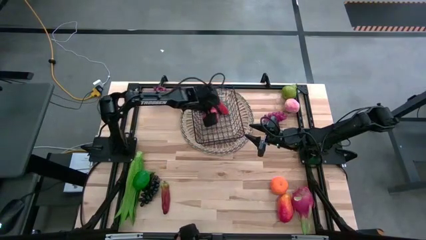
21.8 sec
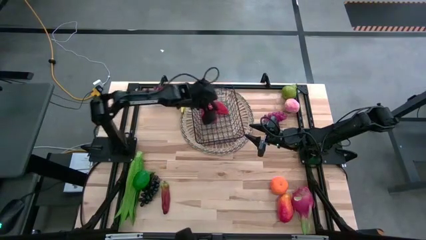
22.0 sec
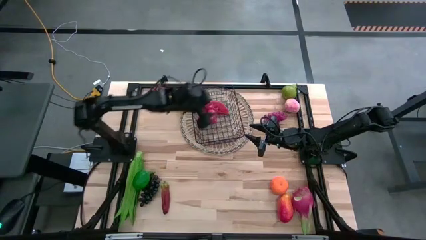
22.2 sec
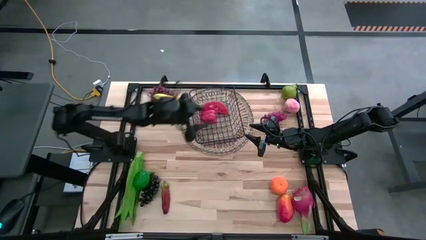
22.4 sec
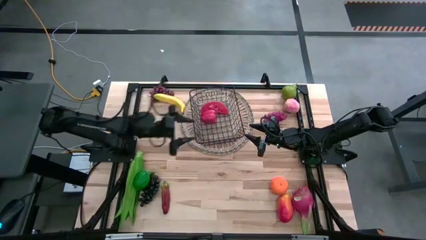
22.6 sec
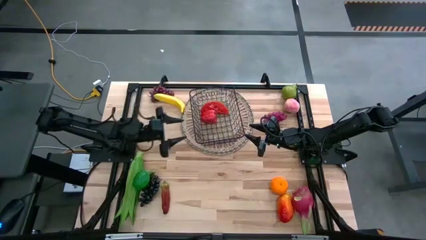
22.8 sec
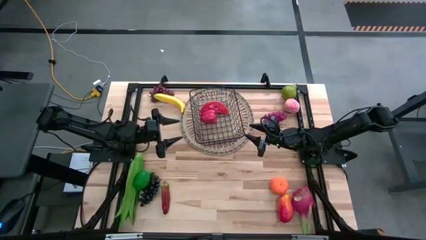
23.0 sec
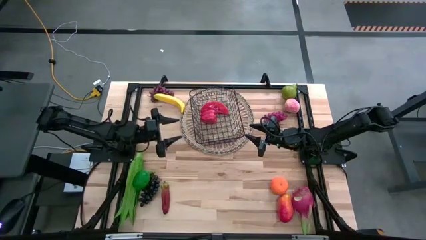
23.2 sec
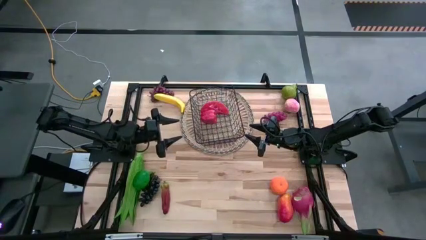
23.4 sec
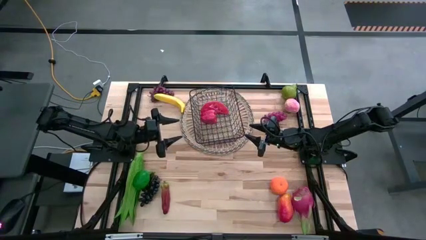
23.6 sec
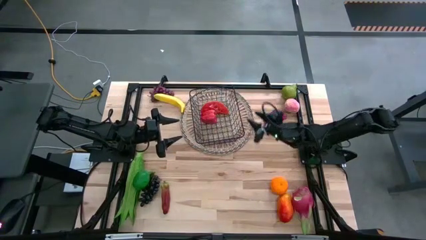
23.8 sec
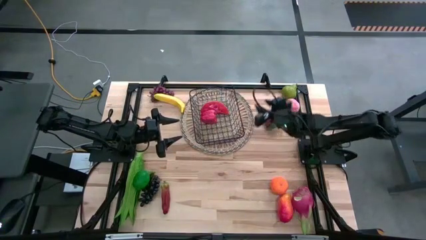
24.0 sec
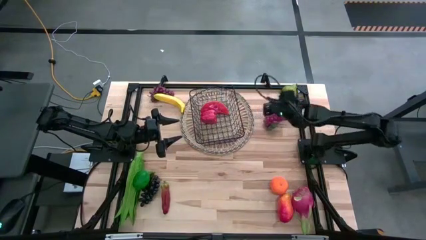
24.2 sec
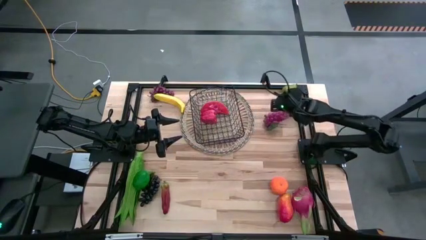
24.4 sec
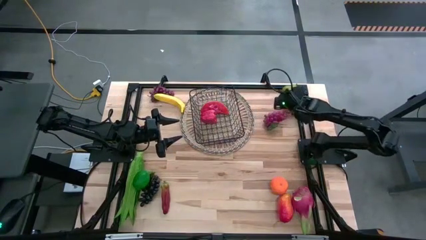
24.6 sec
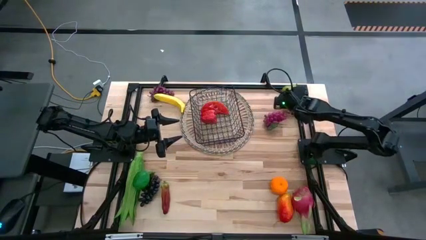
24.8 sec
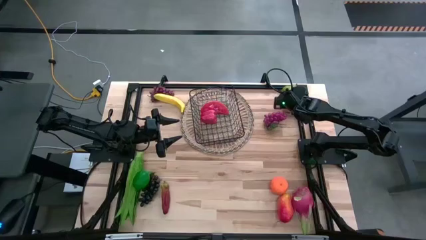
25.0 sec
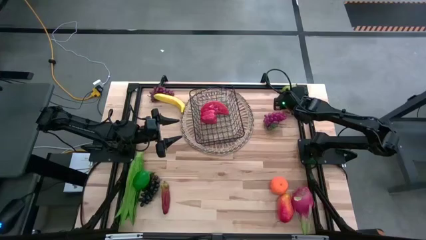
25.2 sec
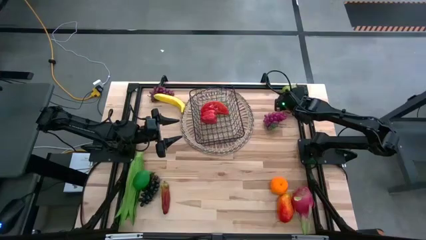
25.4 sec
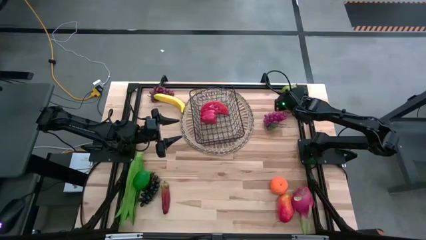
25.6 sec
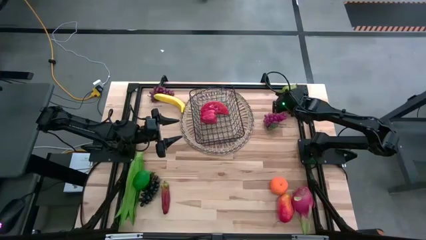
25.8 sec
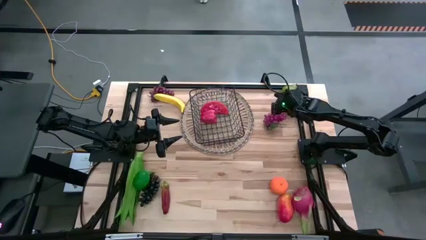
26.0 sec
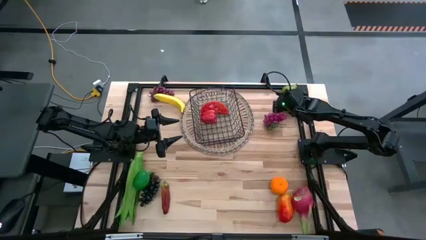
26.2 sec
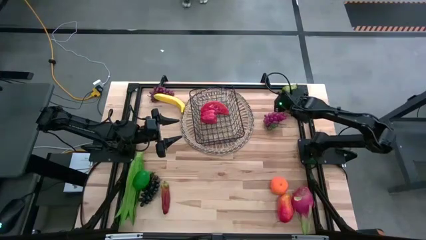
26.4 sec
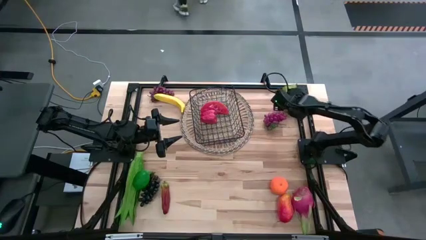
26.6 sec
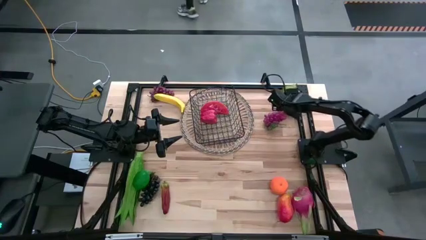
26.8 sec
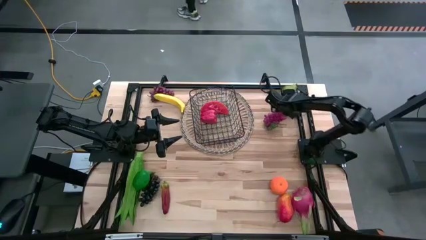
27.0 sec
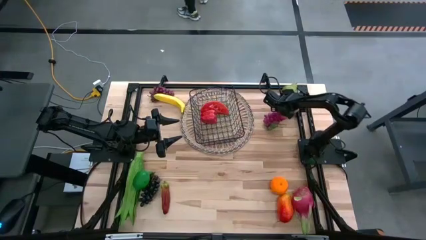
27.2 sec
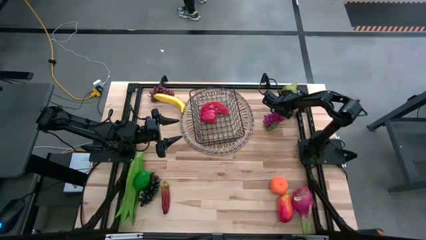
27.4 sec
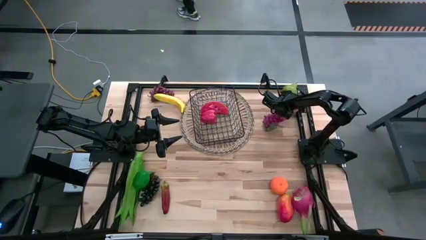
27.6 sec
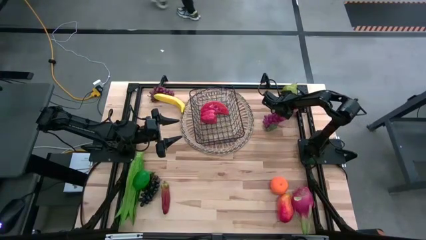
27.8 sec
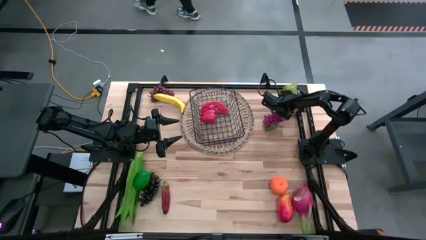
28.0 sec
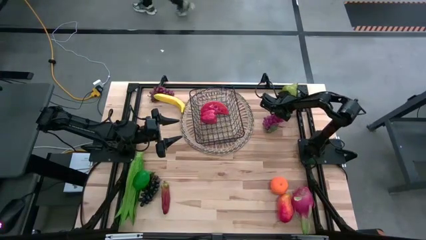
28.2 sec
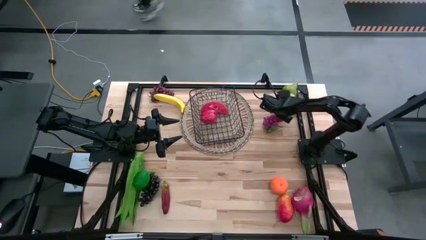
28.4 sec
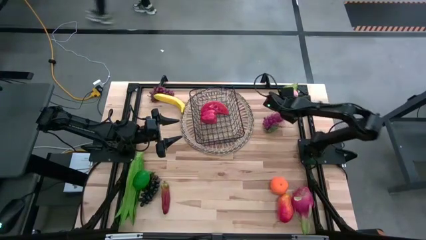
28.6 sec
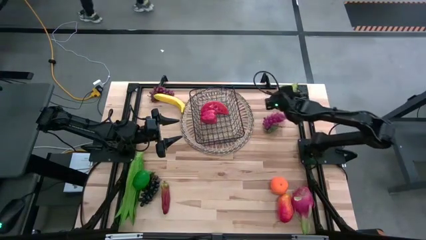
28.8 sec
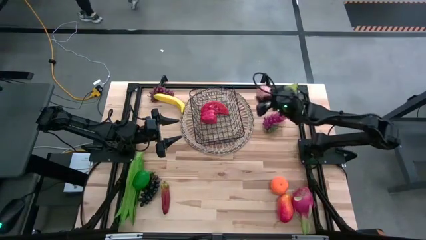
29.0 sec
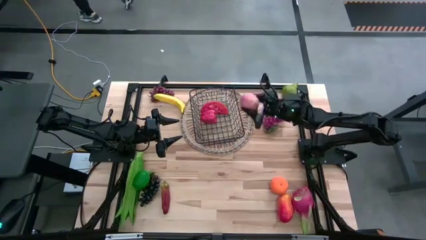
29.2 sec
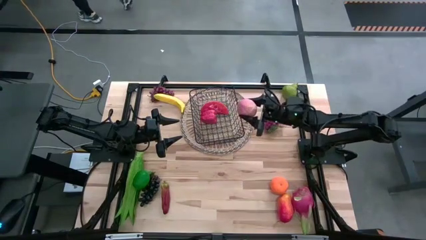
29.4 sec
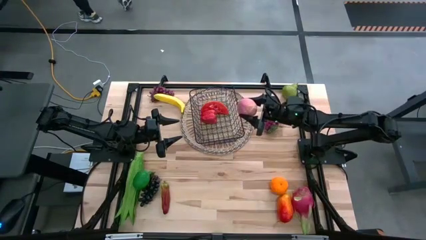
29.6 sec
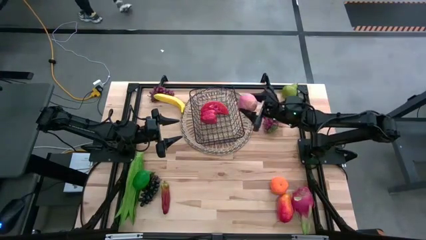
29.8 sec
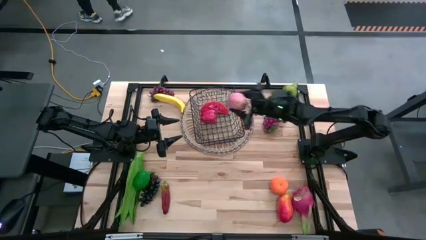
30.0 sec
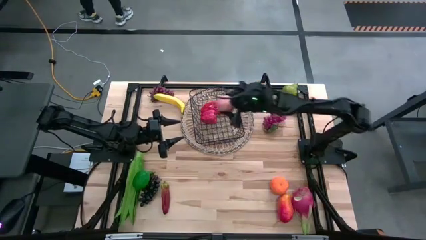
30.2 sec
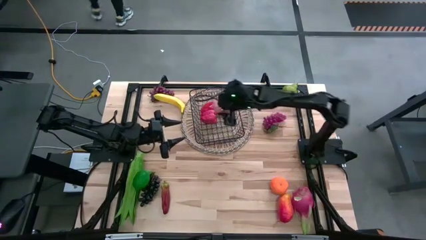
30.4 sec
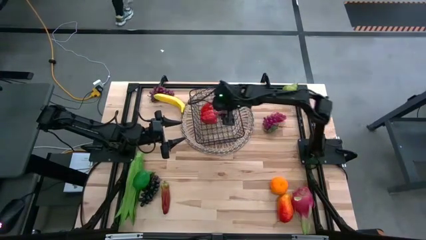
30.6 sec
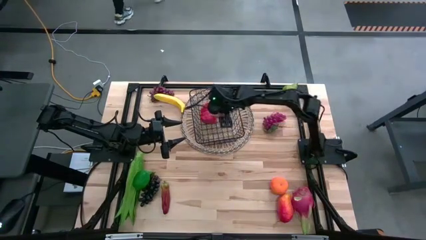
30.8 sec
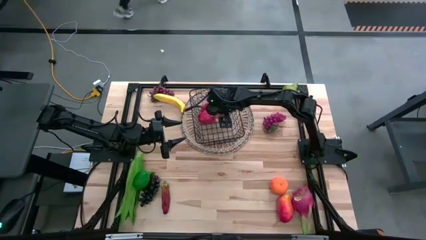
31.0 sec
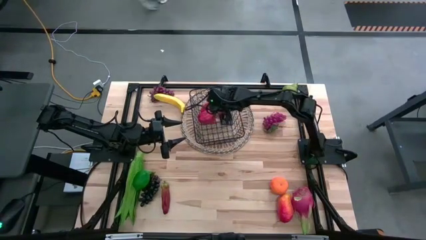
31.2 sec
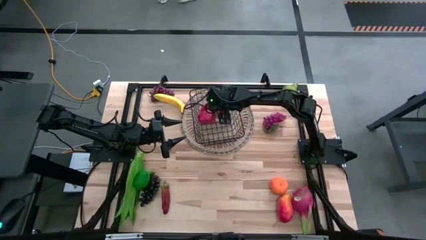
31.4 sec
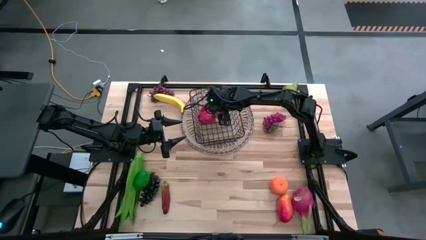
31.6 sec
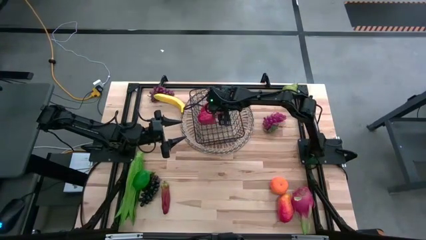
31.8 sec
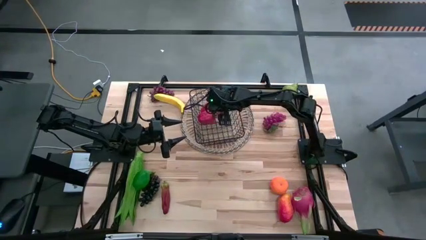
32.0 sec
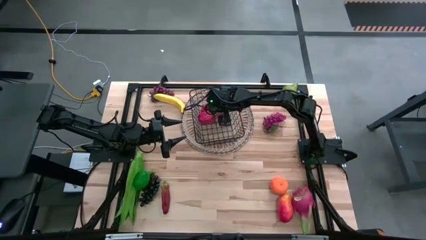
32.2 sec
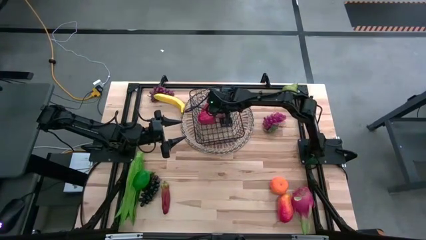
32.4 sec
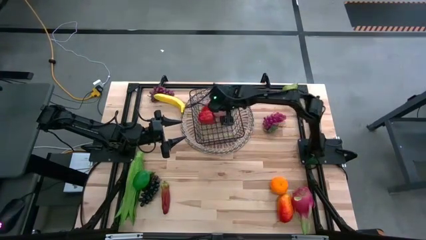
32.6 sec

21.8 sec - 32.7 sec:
Task: Build produce basket
Put the pink peach into the black wire basket
